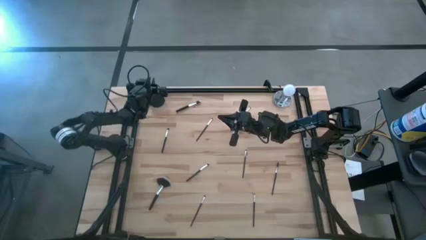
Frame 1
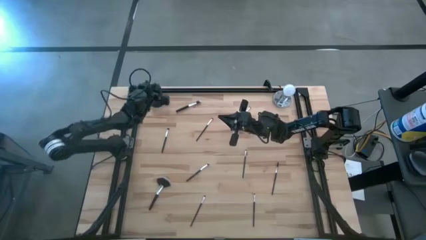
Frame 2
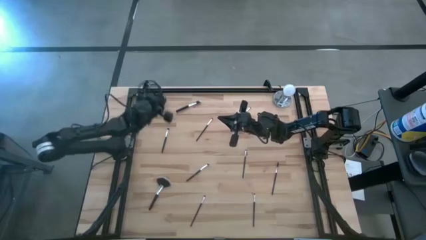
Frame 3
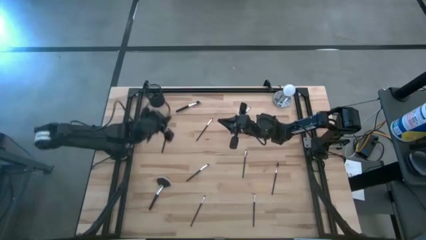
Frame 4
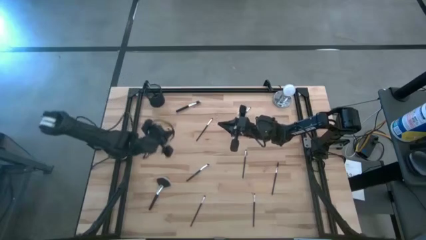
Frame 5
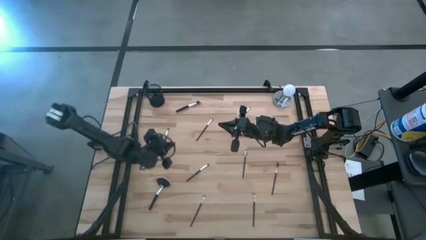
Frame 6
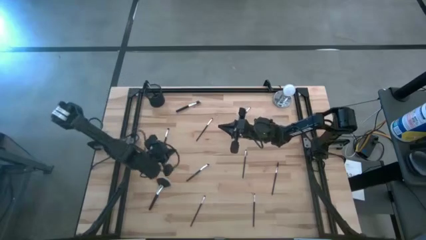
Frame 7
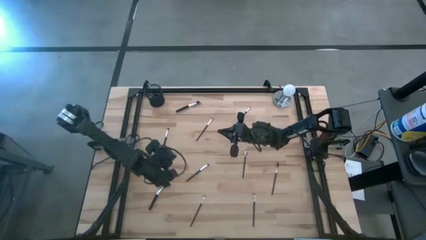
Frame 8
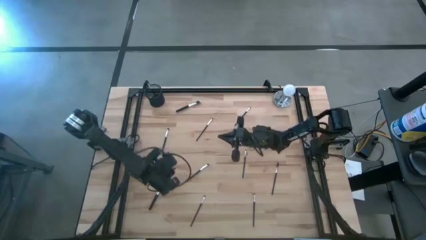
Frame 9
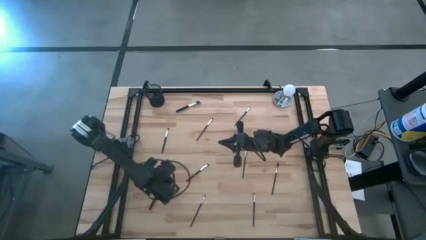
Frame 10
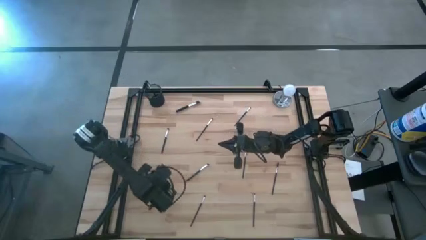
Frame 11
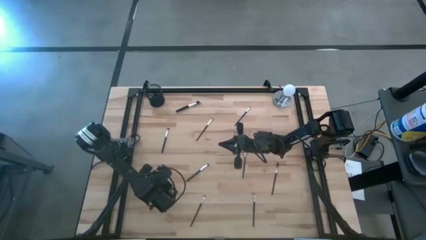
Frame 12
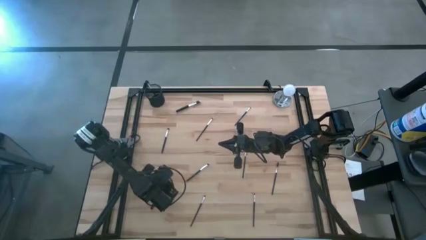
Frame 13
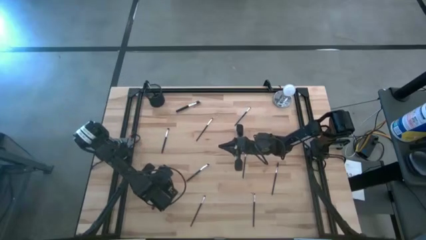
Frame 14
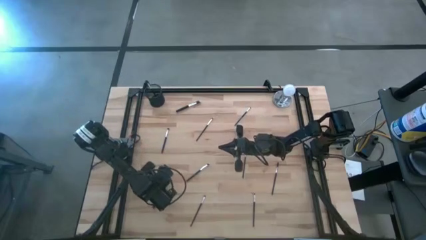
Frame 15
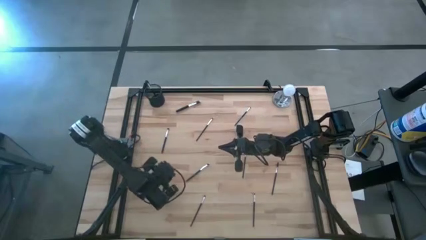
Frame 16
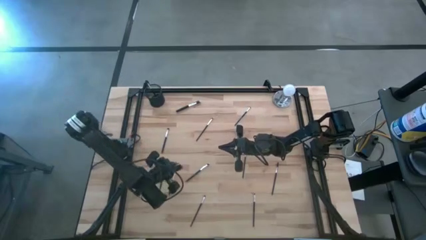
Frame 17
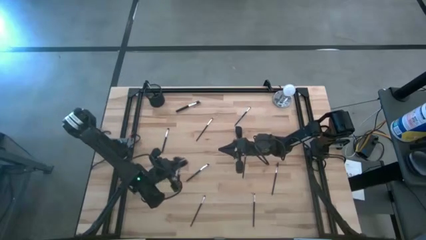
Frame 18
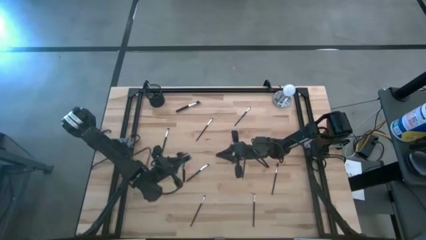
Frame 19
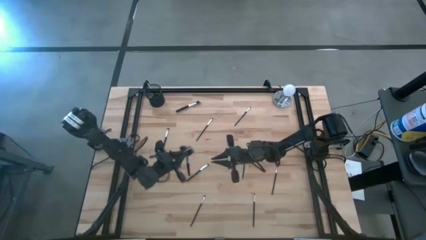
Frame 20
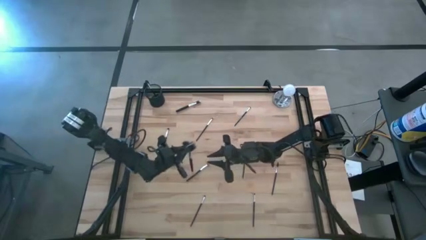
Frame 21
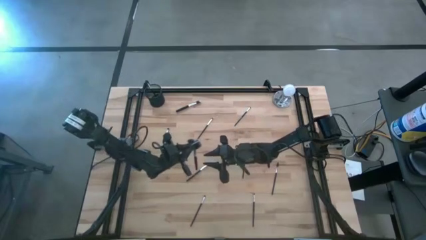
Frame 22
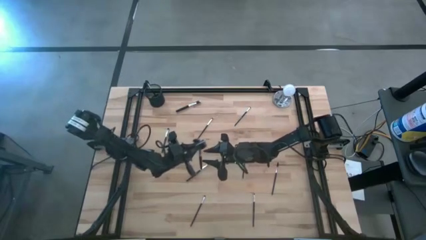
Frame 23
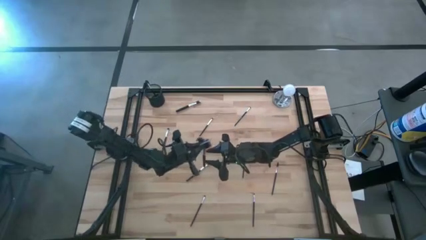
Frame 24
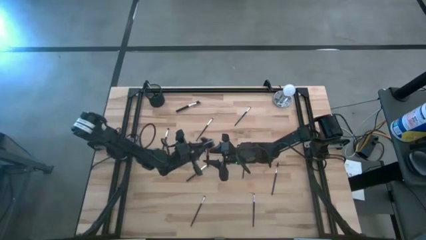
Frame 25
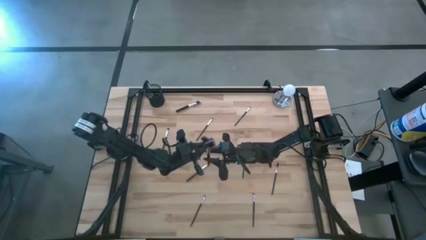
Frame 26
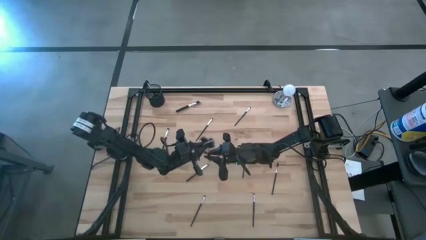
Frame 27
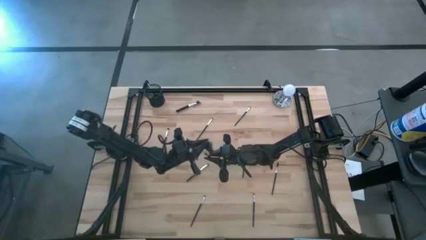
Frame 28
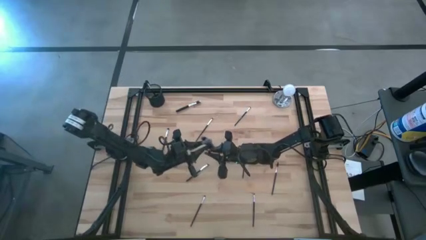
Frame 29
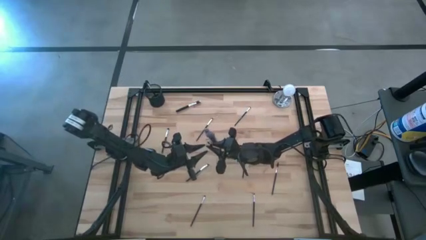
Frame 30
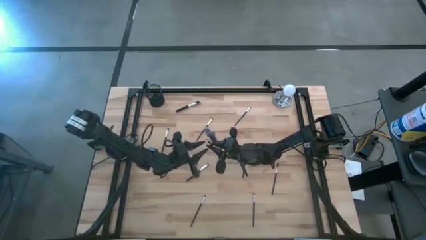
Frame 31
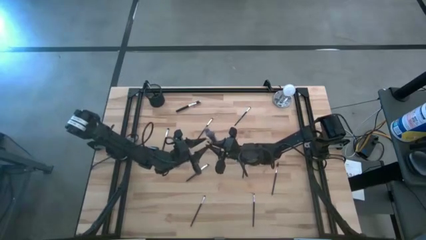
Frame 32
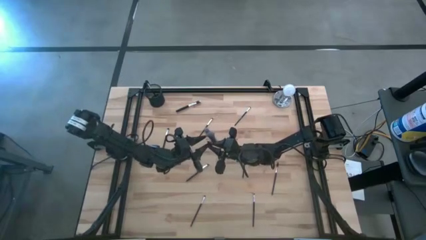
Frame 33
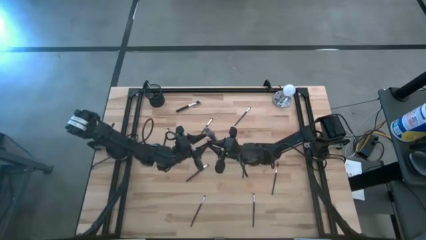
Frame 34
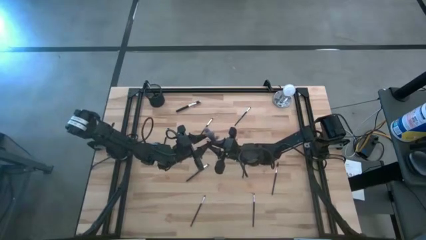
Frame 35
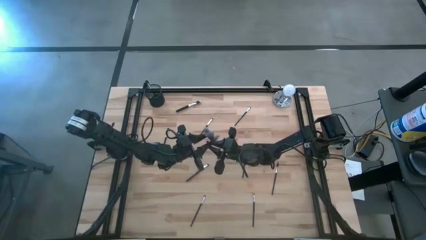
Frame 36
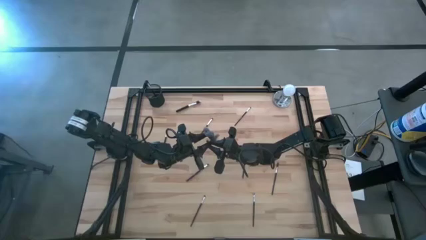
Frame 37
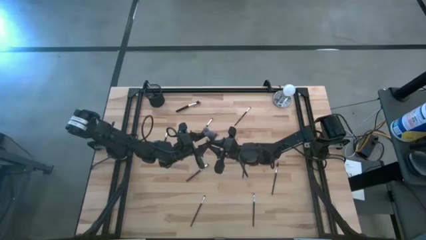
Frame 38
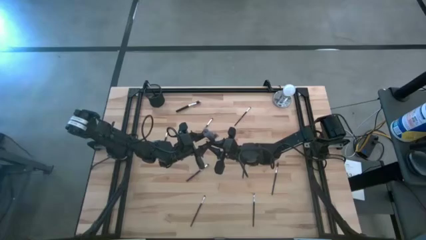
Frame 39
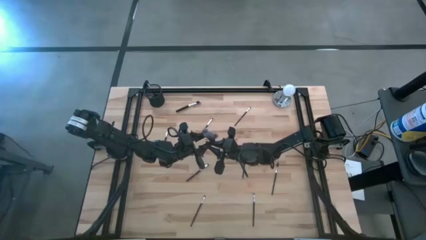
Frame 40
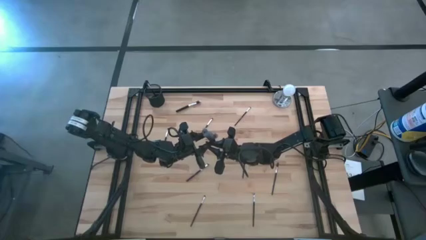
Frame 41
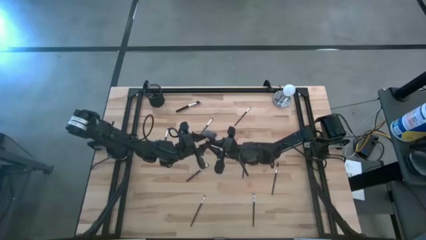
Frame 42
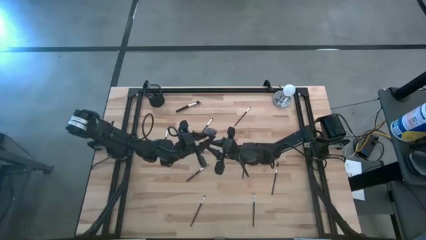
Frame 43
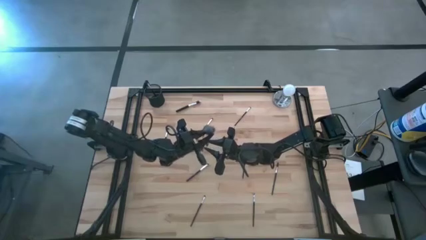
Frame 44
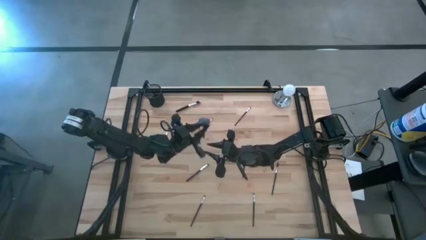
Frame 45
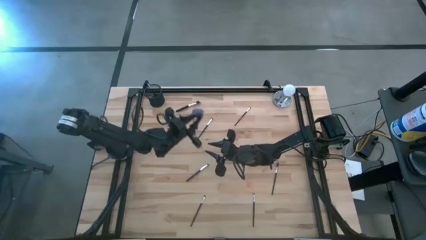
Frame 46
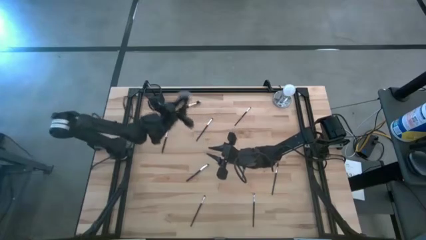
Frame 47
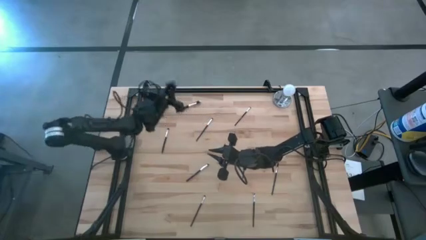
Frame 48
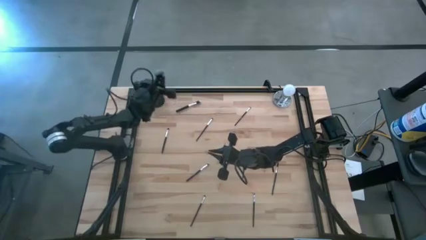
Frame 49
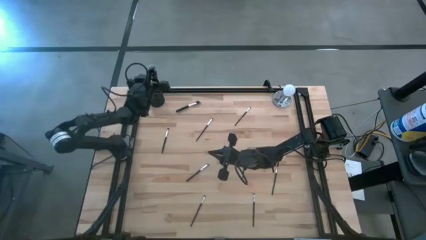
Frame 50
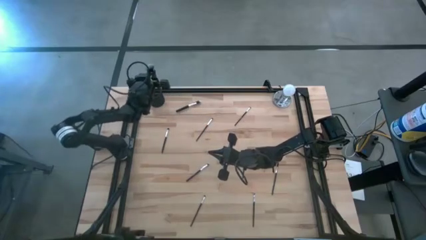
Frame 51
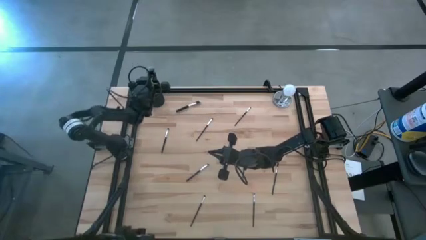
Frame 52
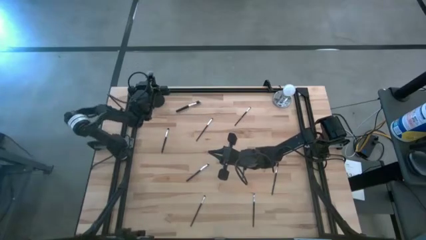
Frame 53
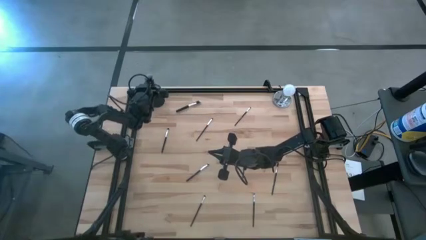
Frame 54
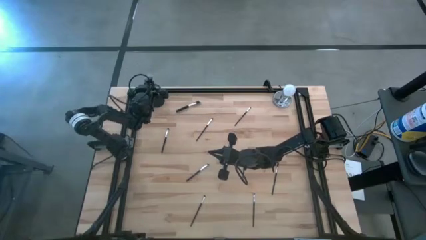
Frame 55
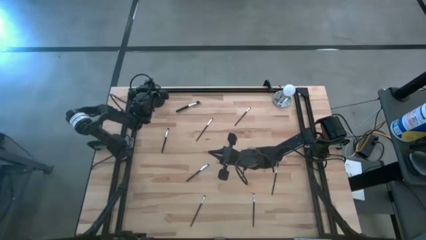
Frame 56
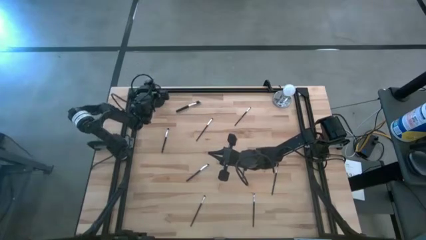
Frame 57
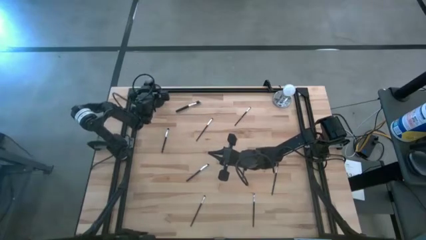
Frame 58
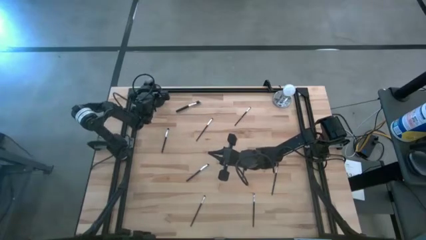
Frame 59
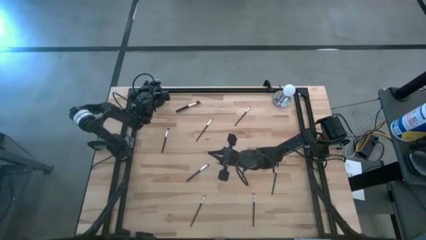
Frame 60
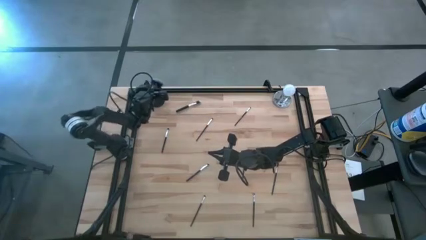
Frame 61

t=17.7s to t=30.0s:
Task: Pick & Place Makeup Supplies
Put the makeup brush into the makeup holder

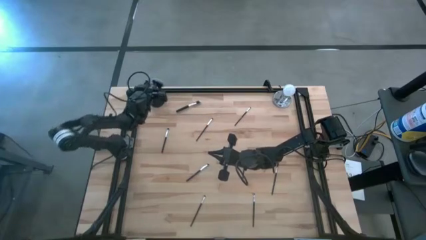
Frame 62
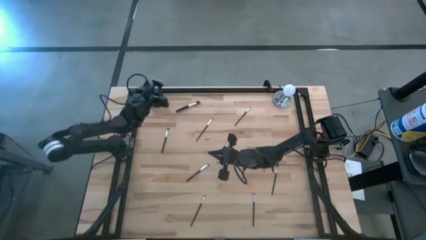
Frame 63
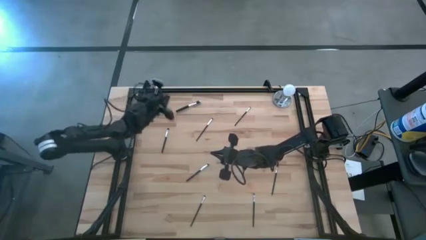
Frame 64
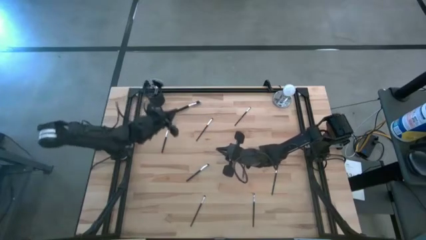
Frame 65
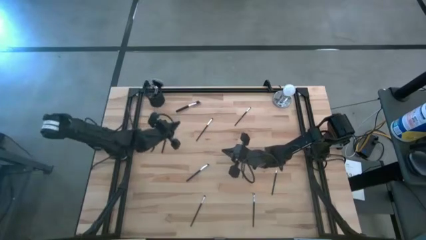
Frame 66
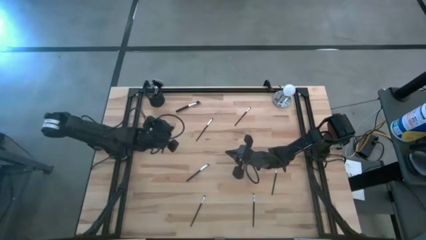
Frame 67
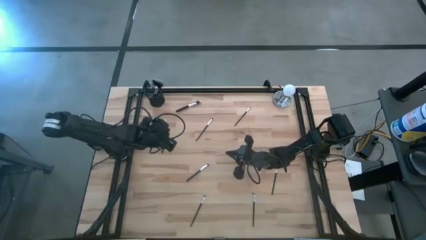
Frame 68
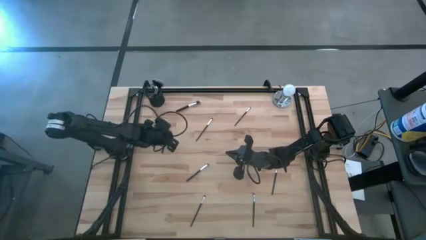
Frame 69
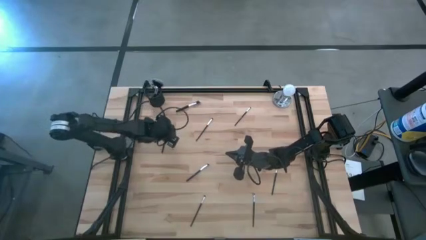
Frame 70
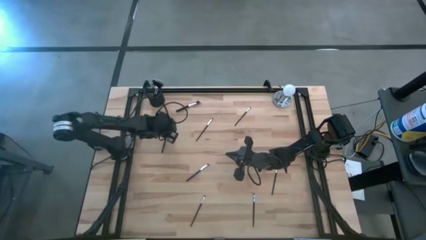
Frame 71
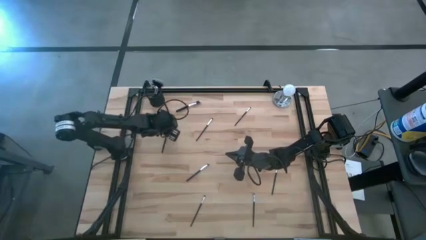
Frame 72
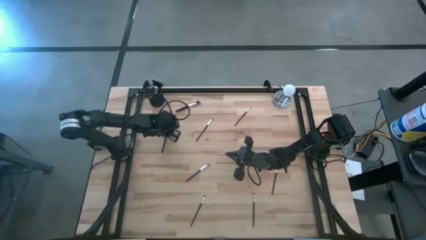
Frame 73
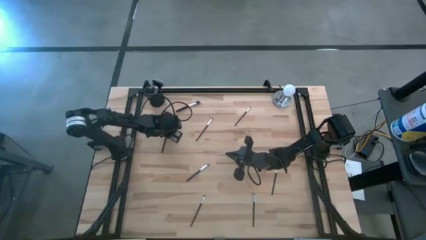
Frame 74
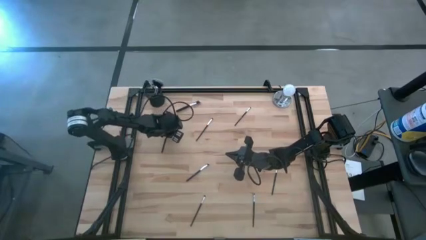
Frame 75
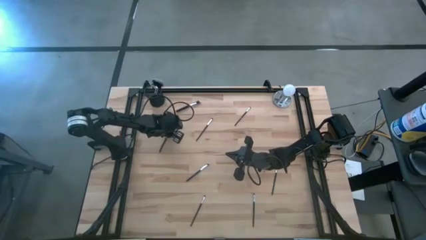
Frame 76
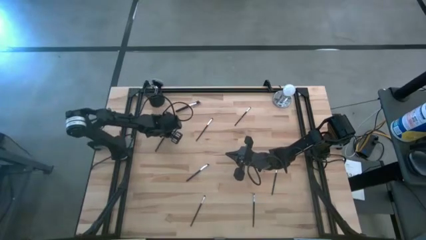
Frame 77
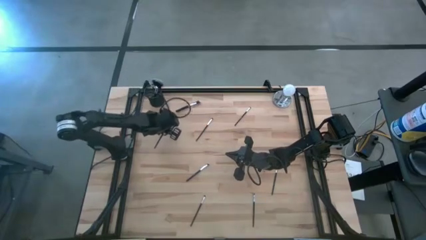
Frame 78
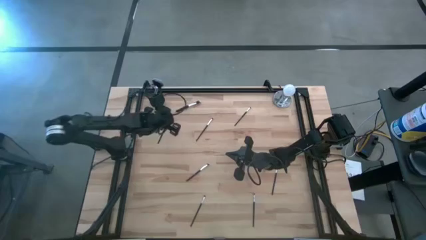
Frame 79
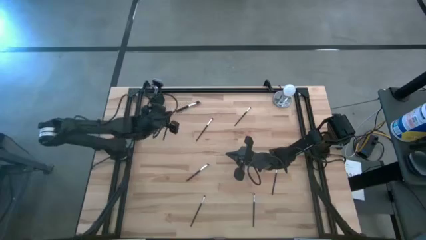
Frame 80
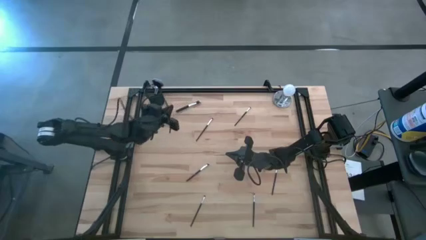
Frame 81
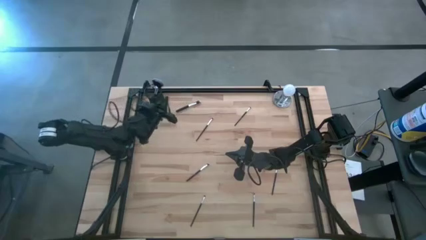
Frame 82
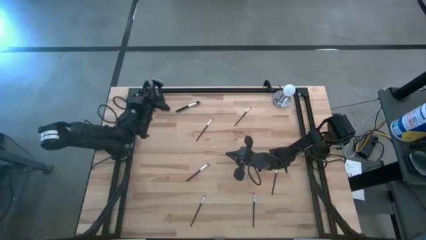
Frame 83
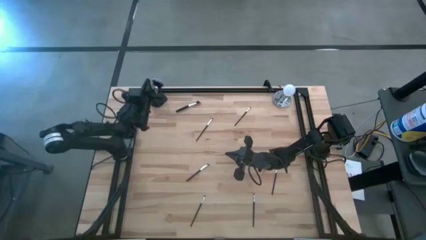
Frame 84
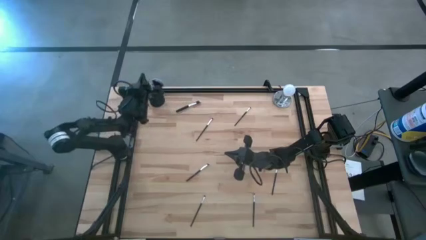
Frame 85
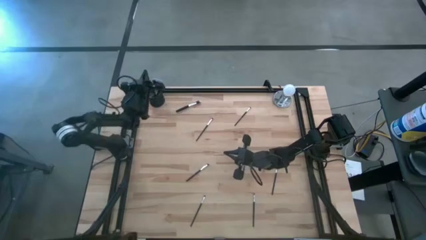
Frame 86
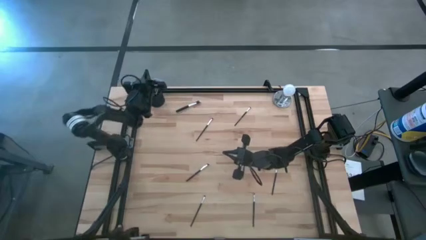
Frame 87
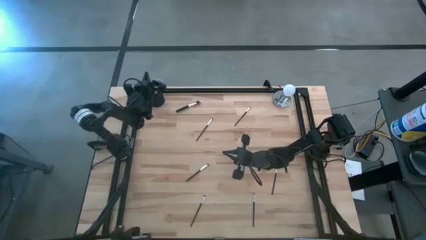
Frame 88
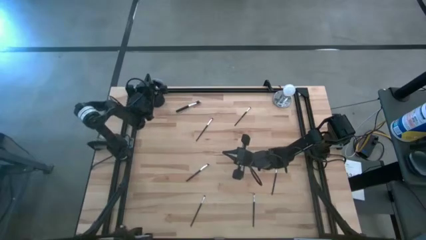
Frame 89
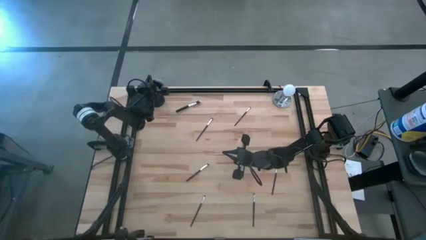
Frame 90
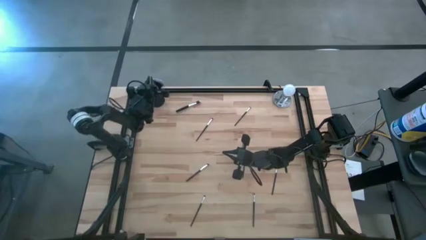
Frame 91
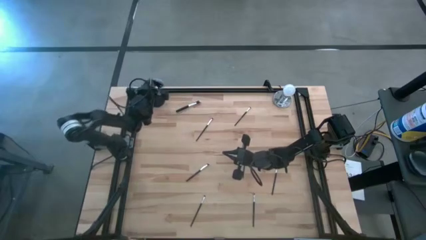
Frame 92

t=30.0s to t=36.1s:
Put the makeup brush into the makeup holder
